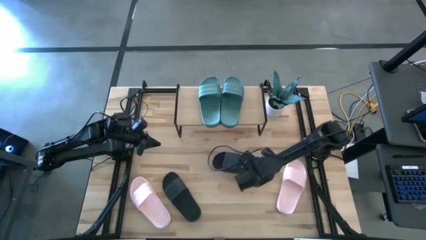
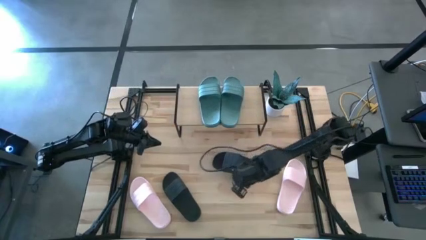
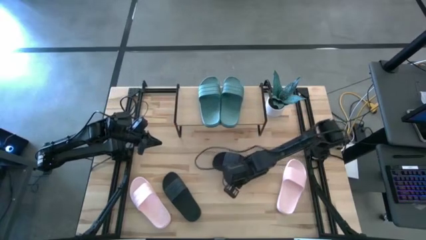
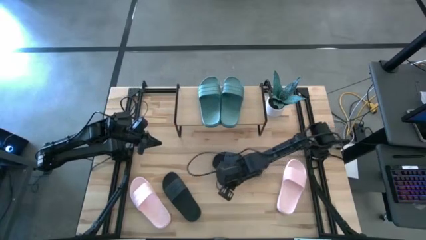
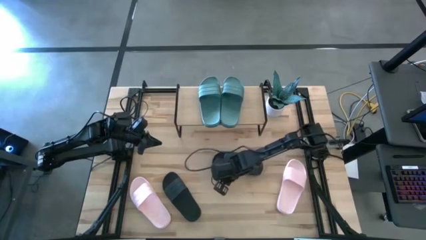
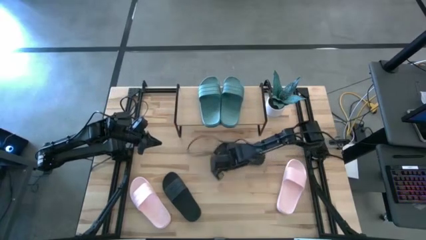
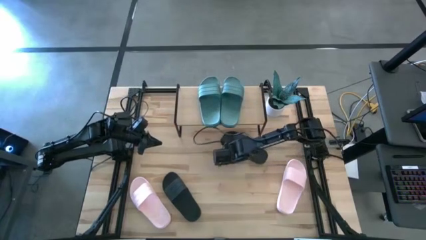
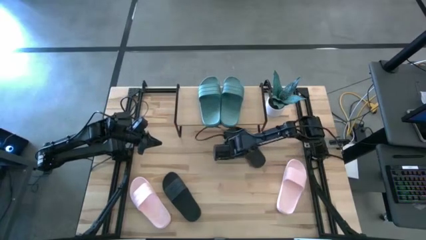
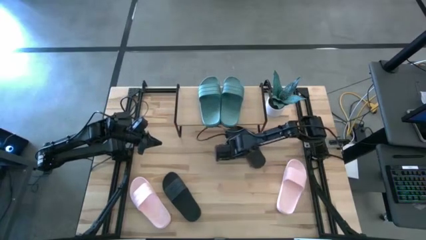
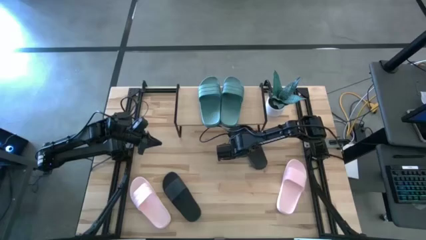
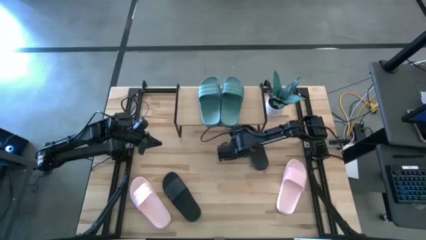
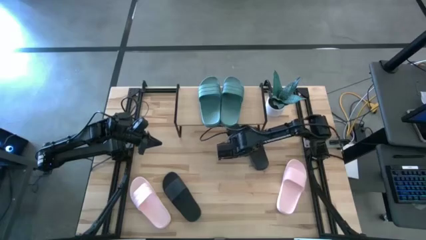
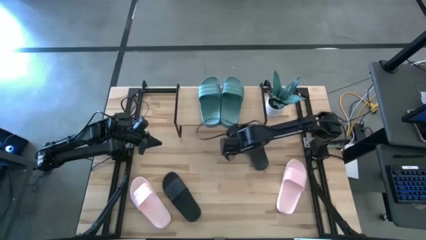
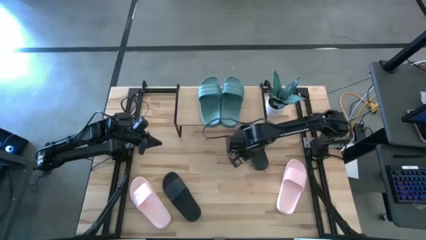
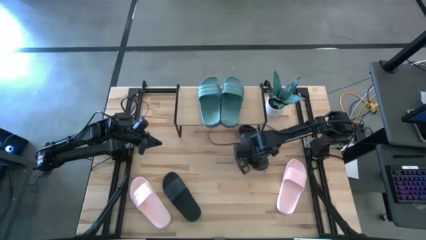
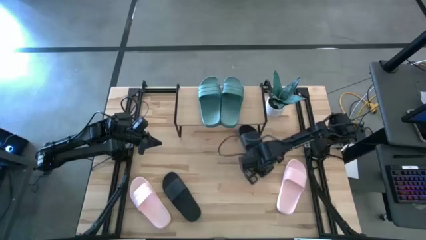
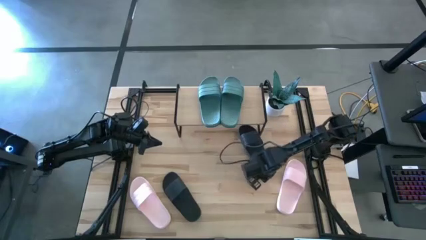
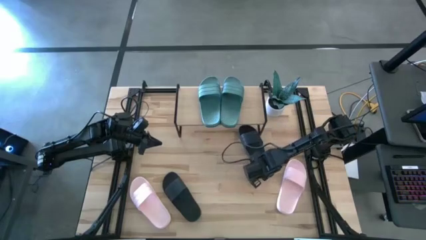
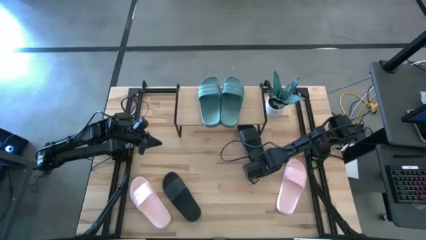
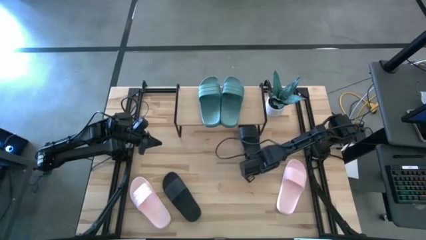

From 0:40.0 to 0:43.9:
Task: Pick and place slides into the shelf
Put the right black slide under the shelf

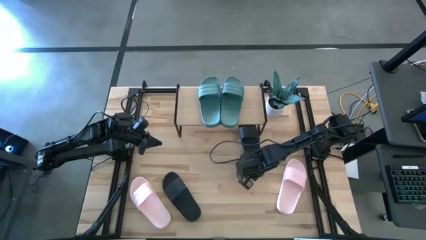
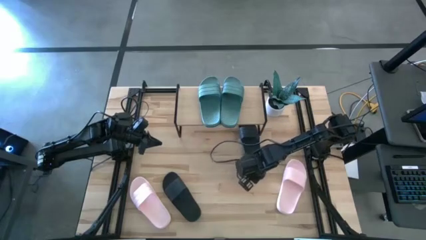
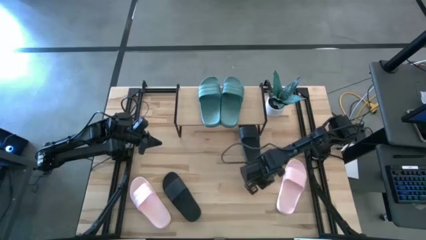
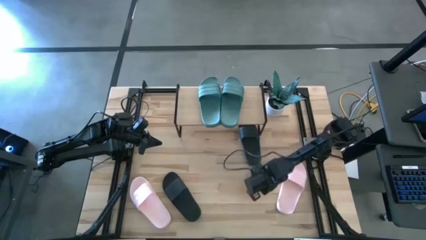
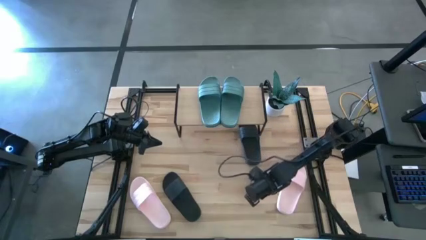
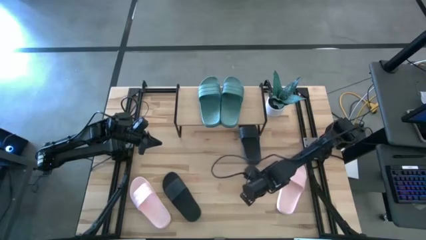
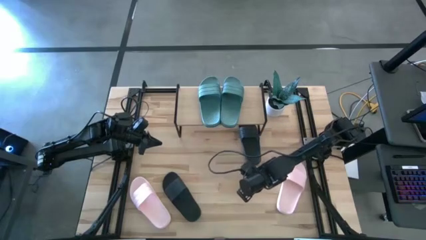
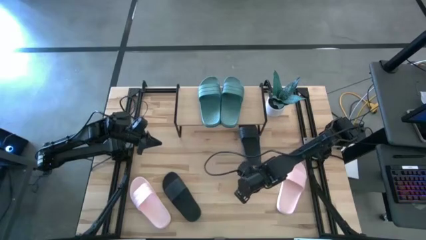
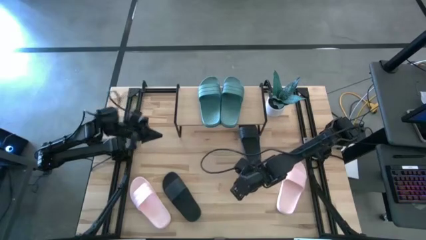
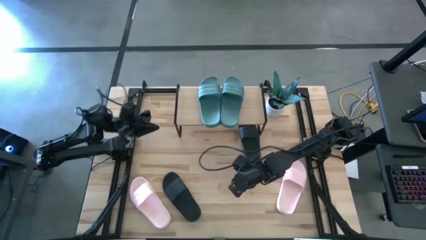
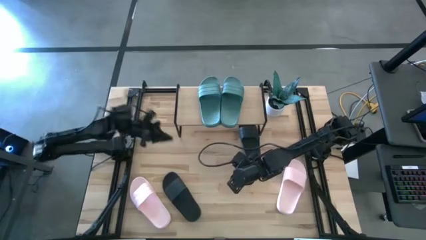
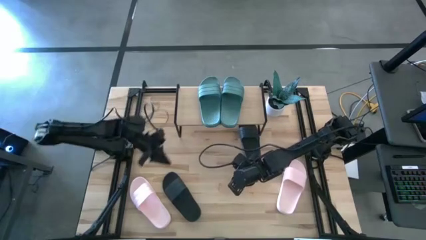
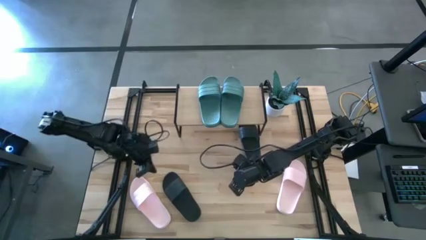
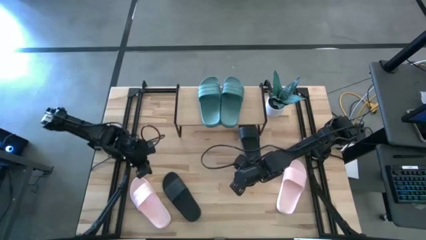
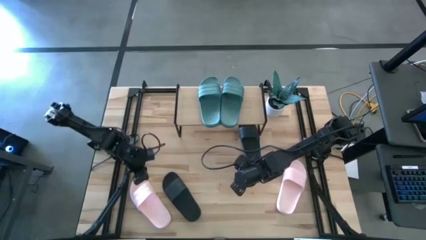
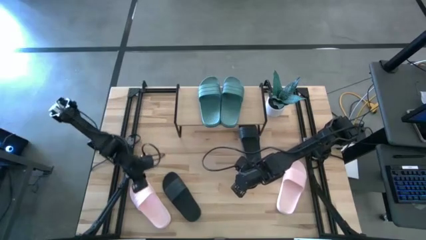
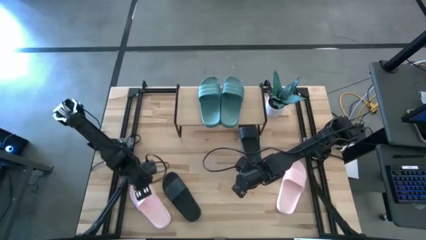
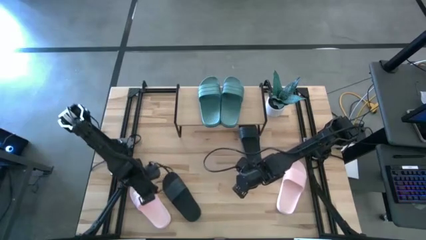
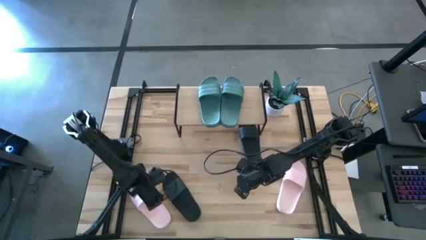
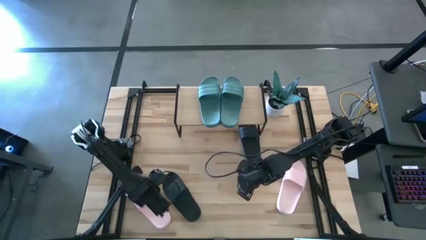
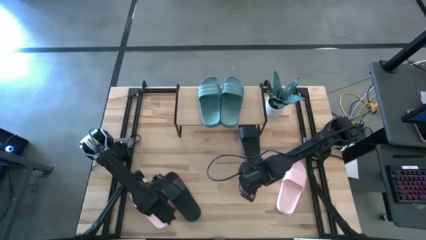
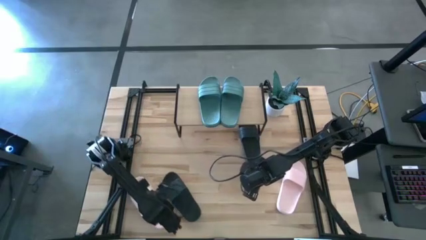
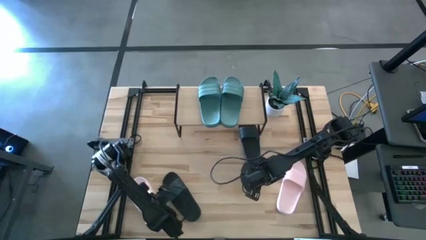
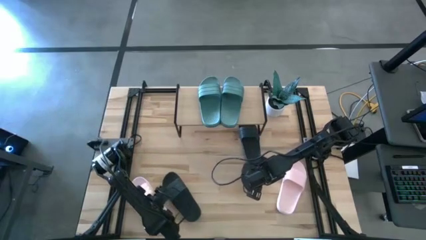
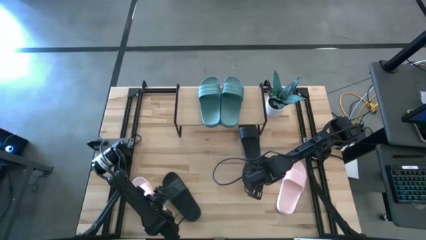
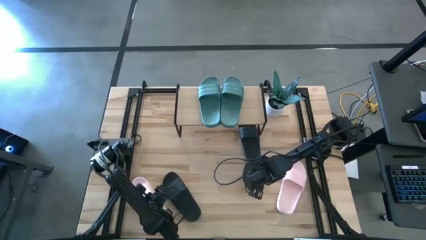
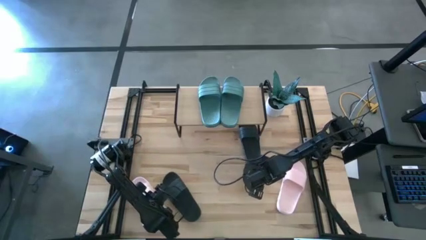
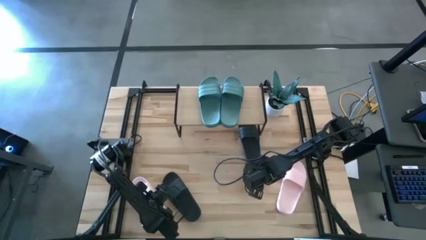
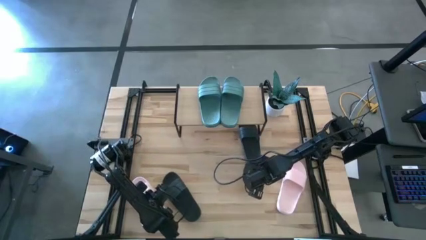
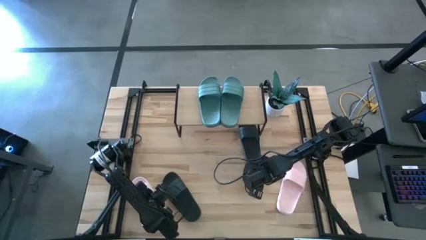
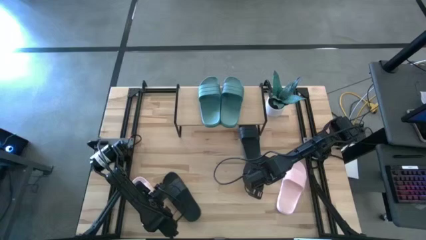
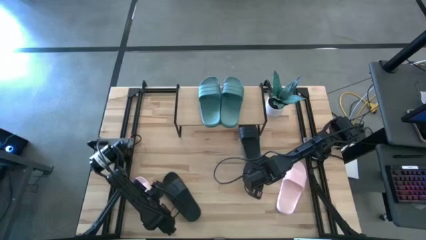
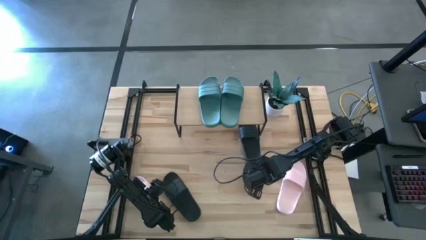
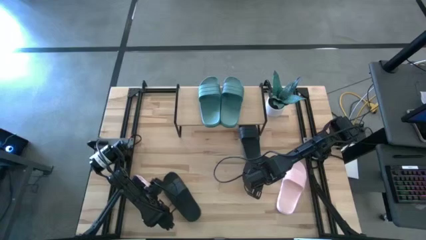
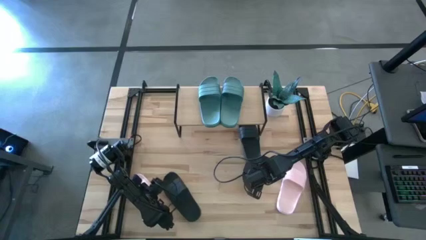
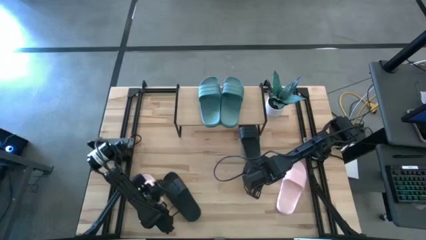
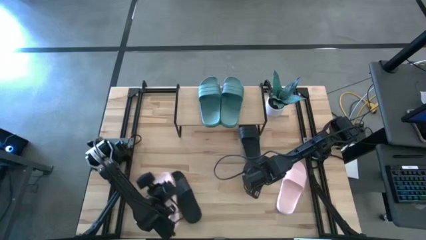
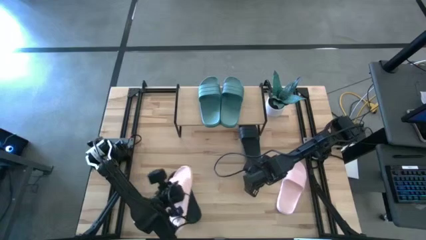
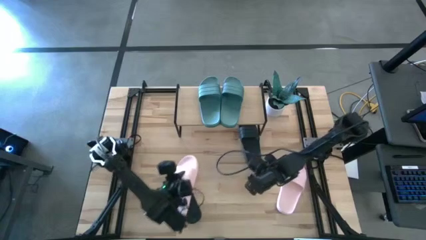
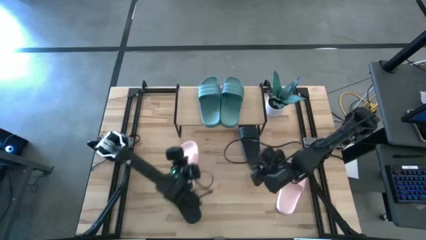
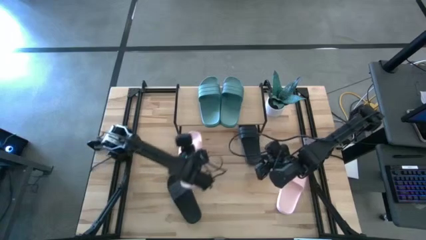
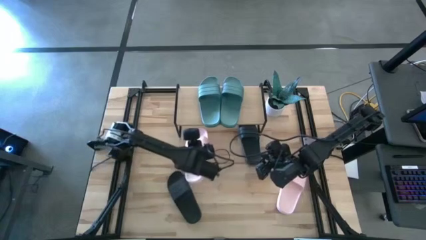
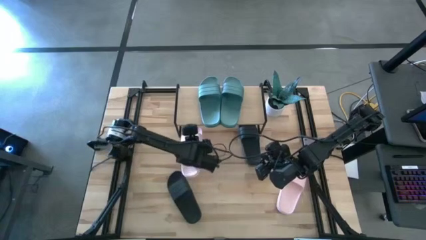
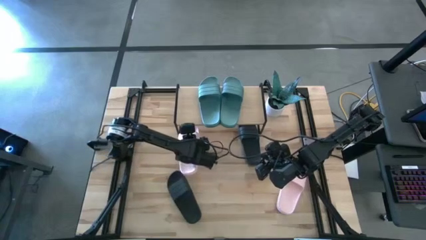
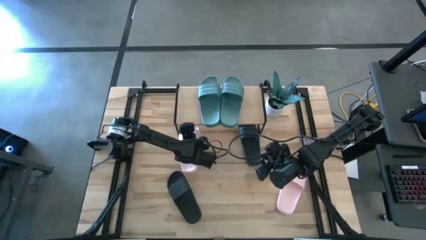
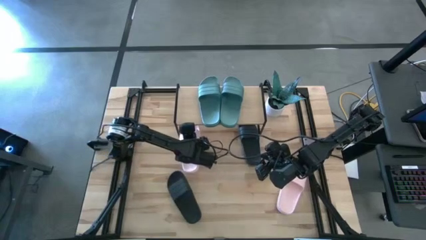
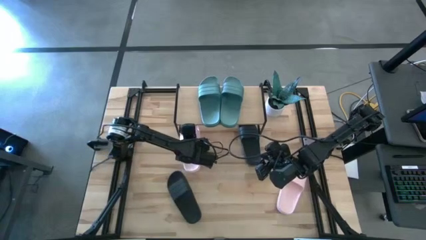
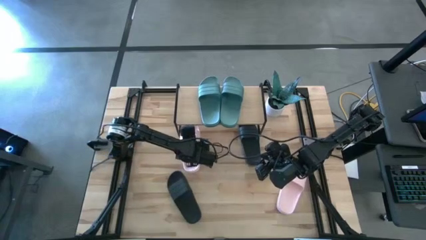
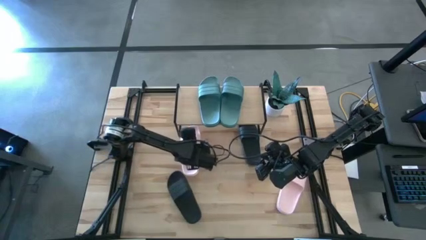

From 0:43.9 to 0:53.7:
Move the left pink slide to the middle of the table

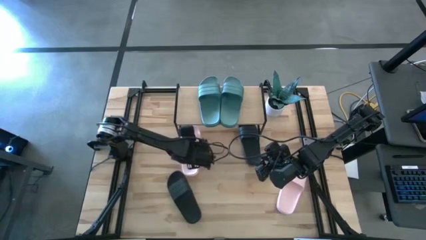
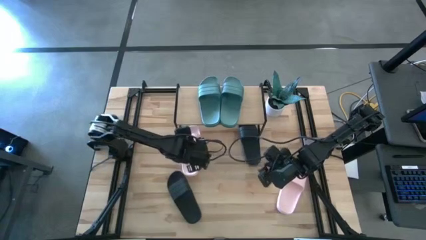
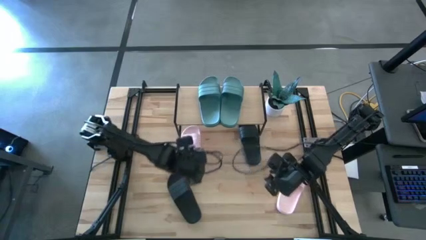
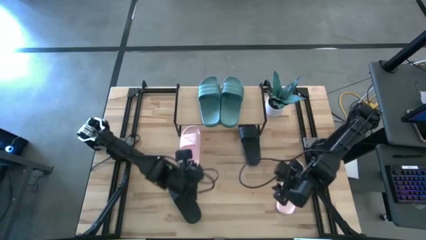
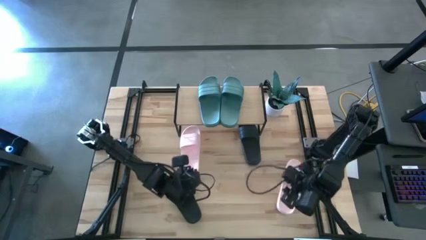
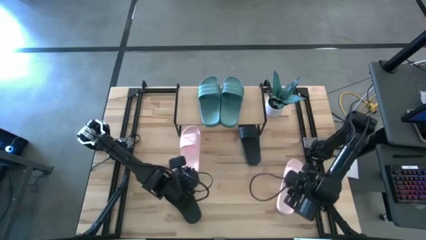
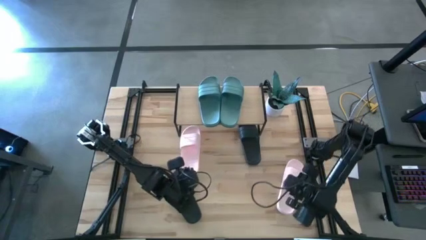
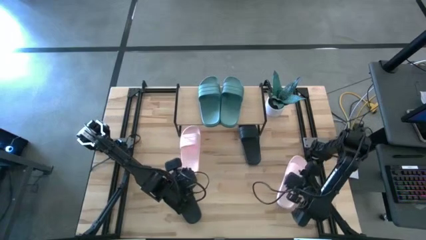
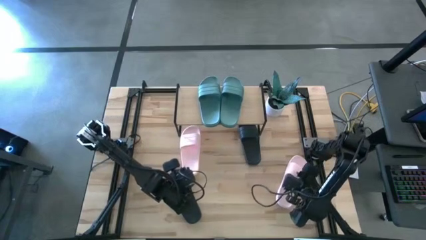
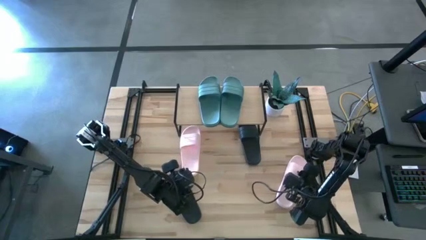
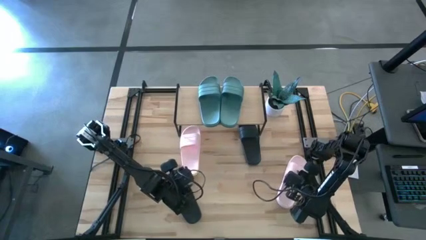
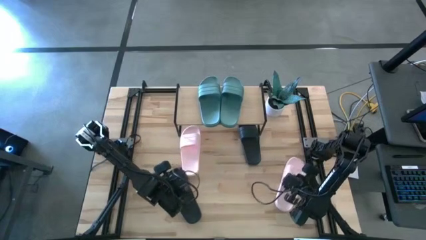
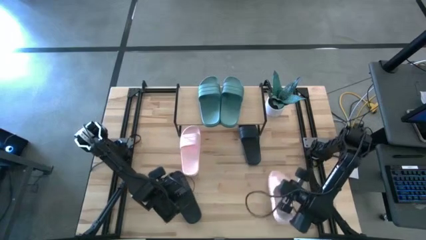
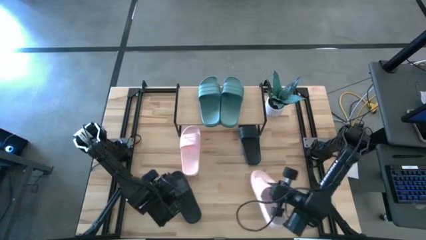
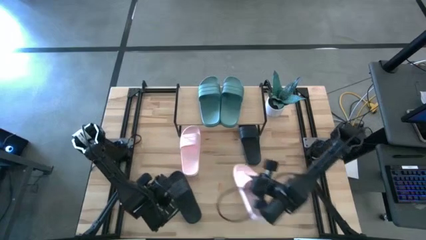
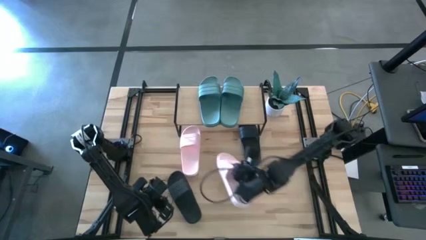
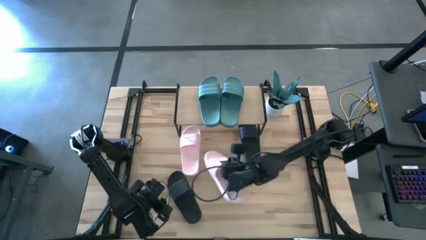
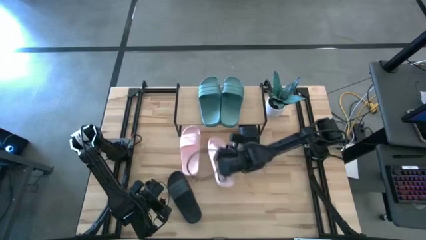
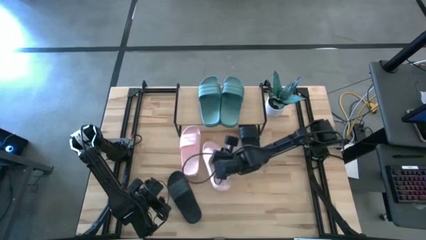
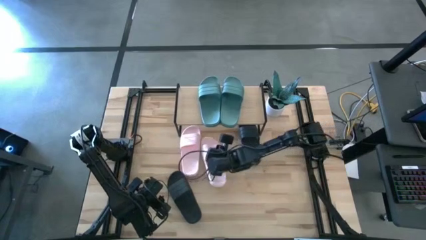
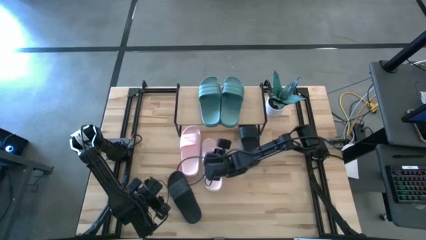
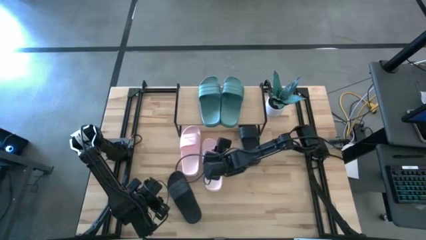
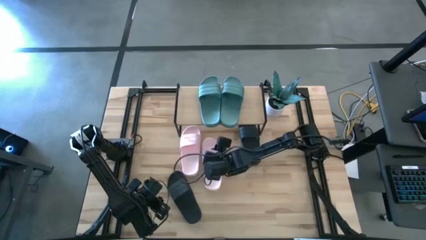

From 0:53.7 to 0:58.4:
Move the right pink slide to the right of the left pink slide
